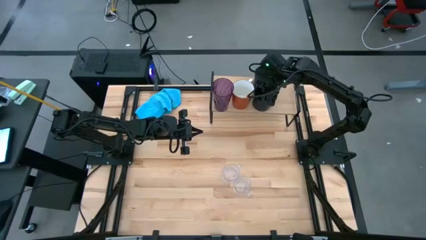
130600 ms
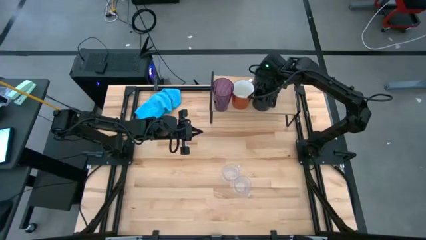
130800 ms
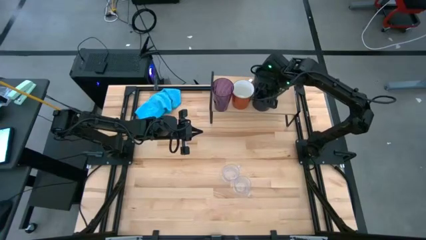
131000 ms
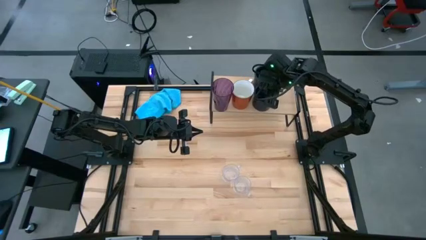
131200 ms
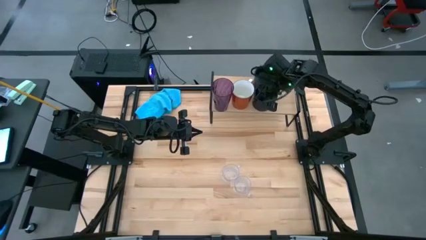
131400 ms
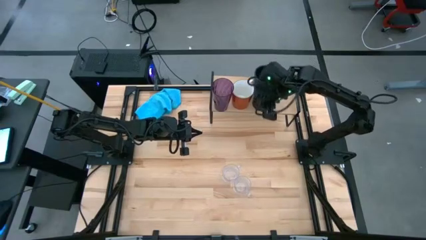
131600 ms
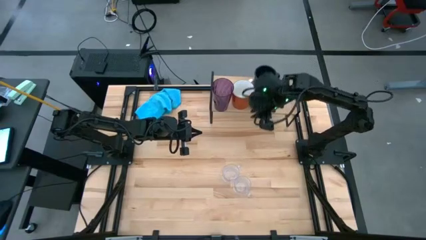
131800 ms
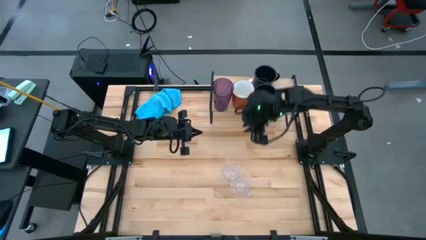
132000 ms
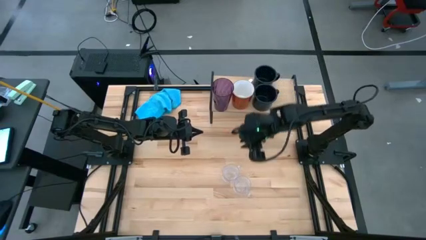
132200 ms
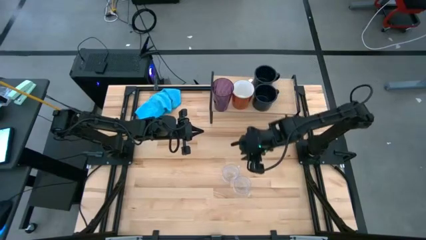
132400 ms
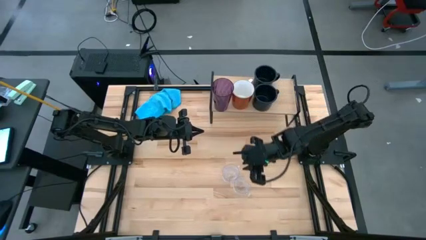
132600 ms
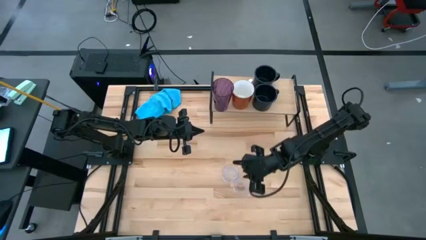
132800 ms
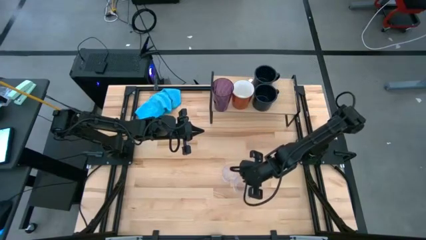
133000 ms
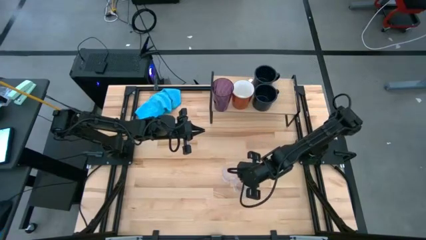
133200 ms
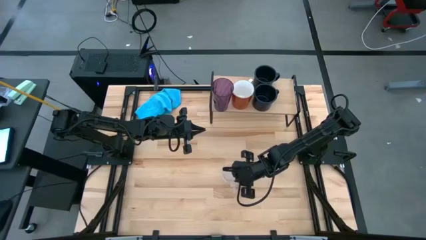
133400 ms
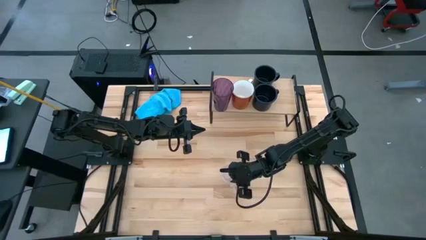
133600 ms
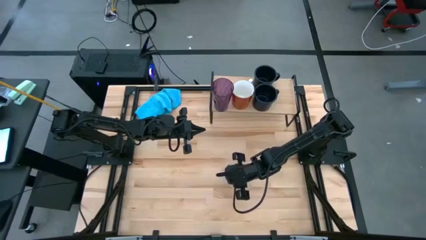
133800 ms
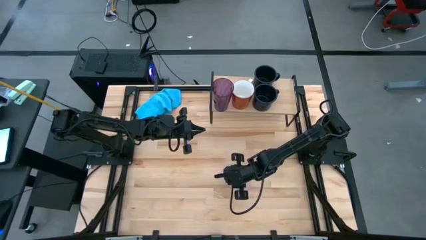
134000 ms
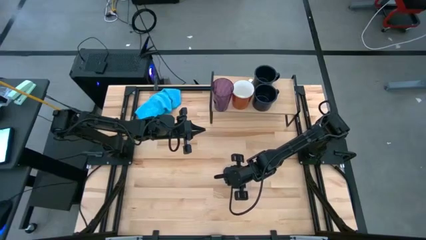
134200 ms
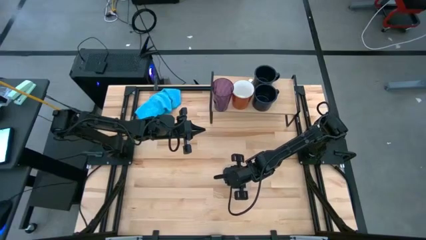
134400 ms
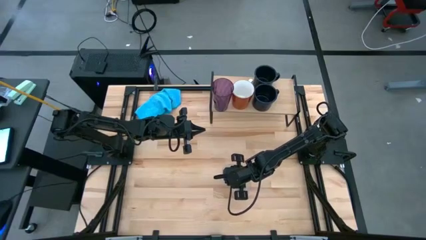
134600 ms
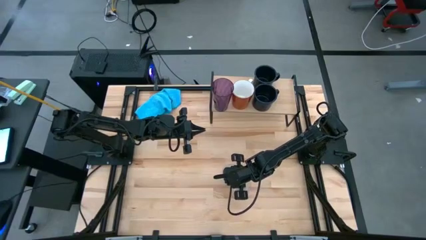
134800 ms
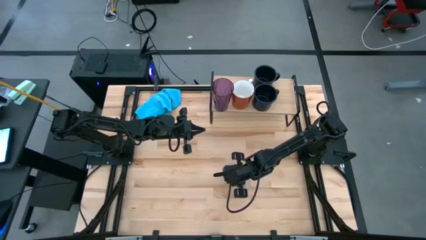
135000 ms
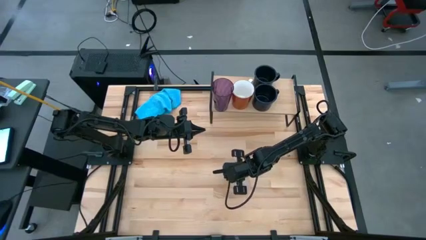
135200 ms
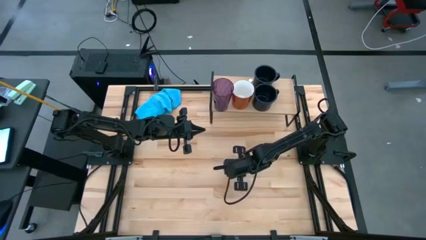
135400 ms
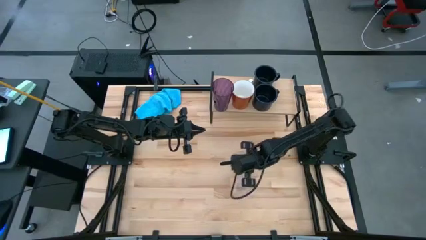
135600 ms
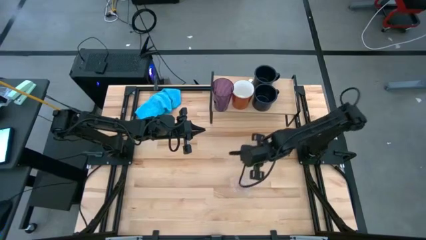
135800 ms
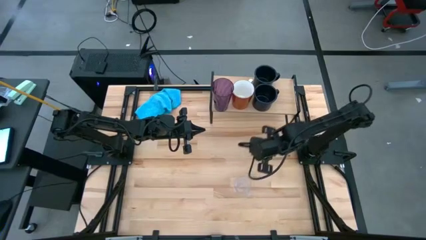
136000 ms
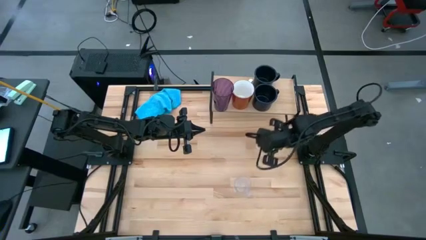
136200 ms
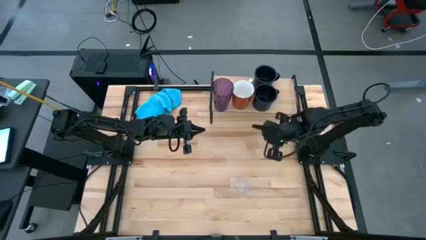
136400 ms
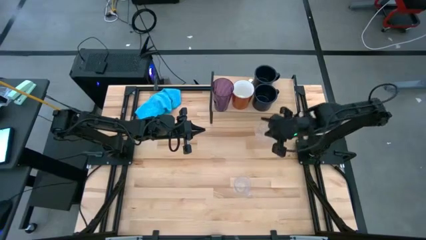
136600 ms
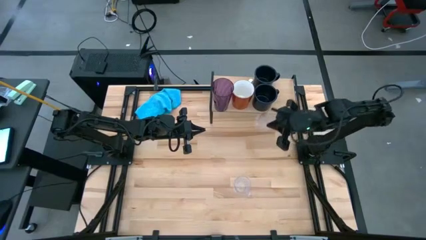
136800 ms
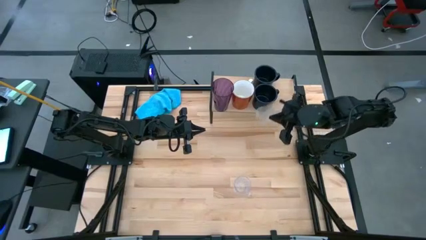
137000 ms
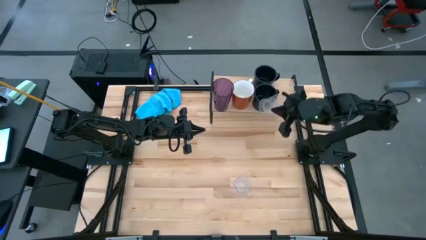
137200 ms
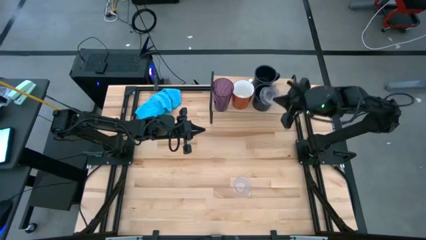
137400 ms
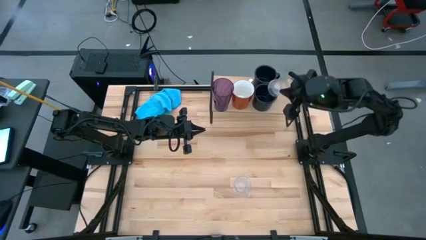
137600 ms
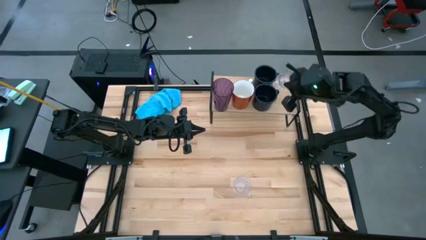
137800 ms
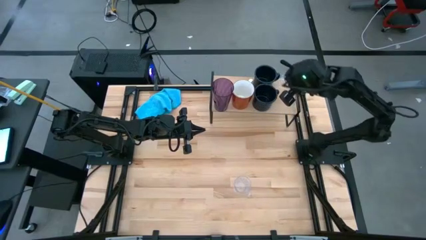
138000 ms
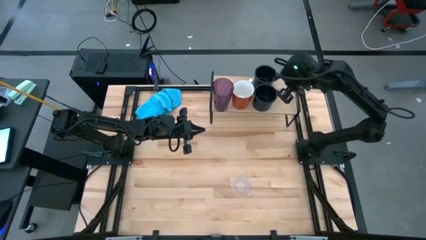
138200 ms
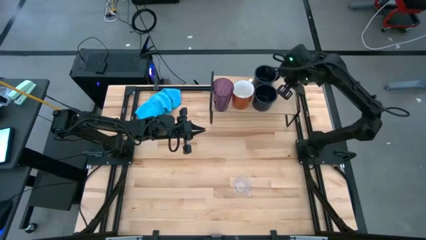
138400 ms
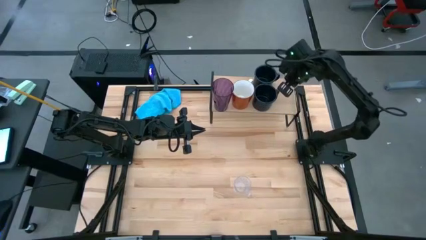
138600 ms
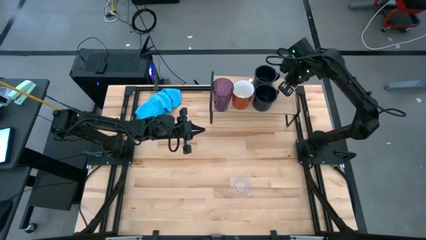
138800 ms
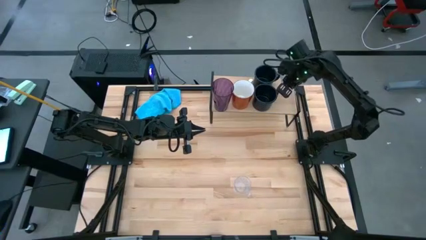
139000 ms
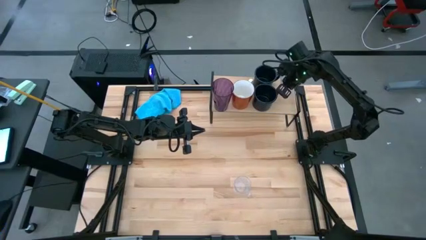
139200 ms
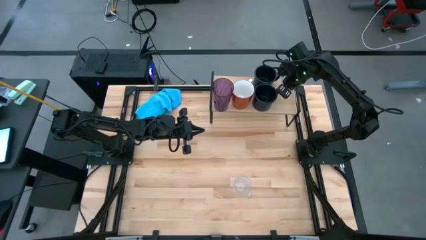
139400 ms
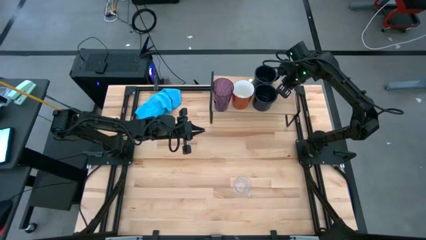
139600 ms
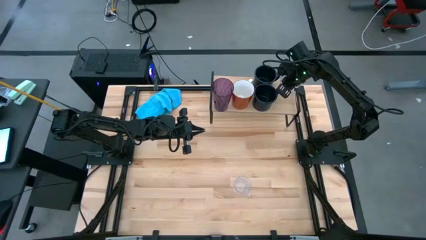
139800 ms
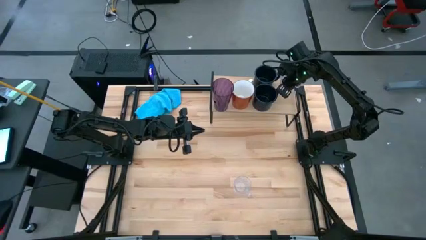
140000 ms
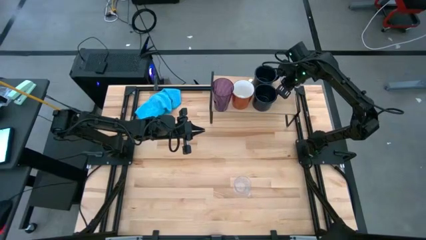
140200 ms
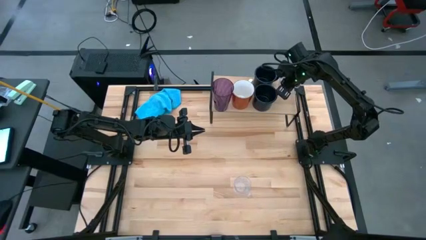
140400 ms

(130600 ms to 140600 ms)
Task: Stack small to large cups/mugs on shelf
Put the top transparent mug on the shelf

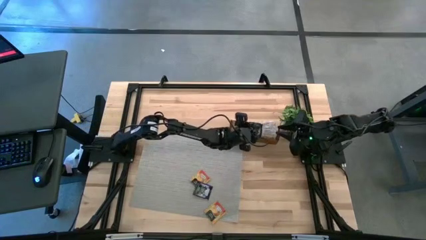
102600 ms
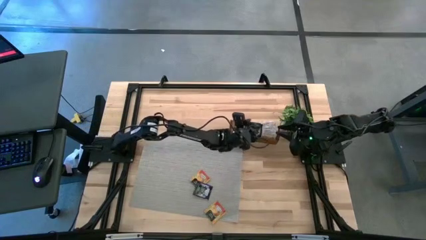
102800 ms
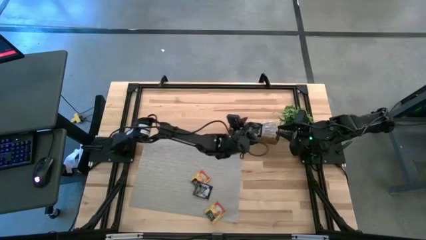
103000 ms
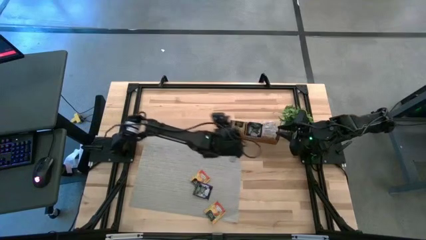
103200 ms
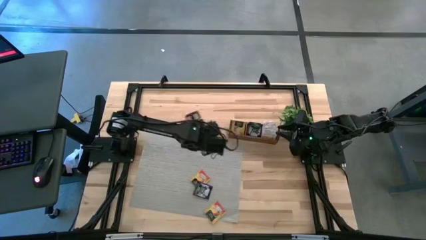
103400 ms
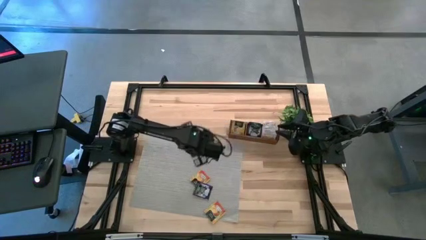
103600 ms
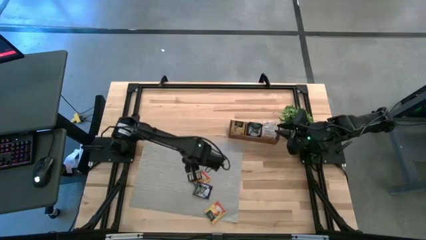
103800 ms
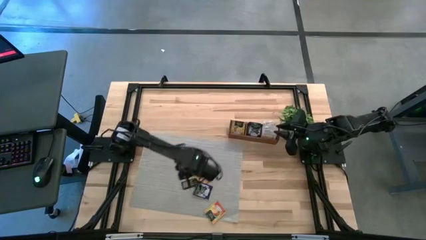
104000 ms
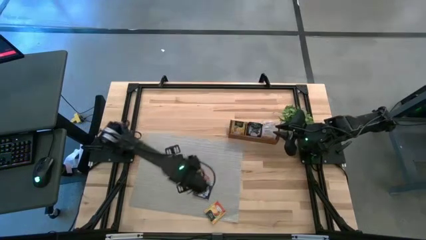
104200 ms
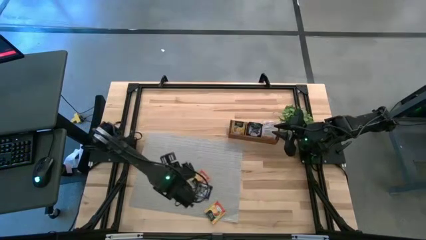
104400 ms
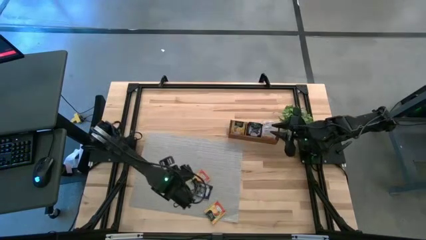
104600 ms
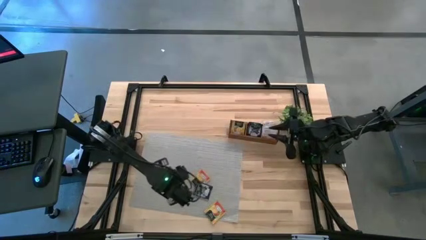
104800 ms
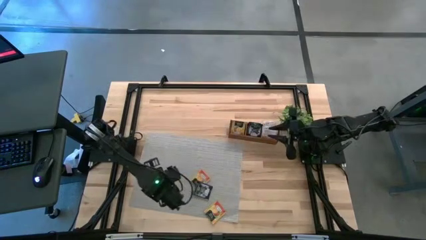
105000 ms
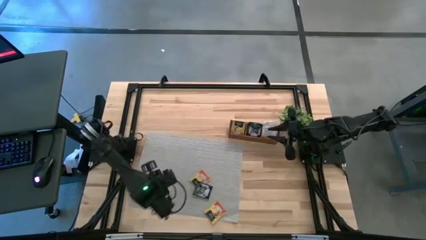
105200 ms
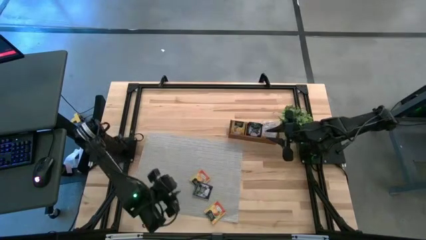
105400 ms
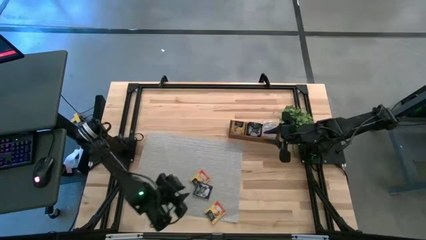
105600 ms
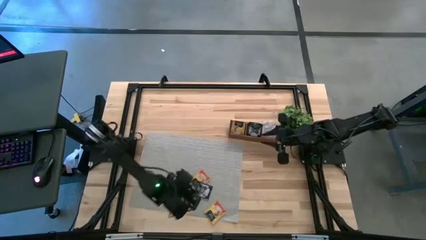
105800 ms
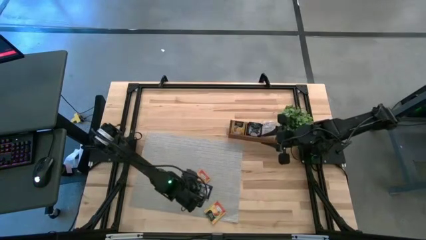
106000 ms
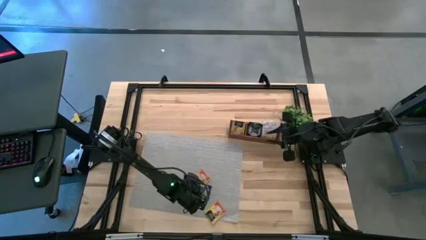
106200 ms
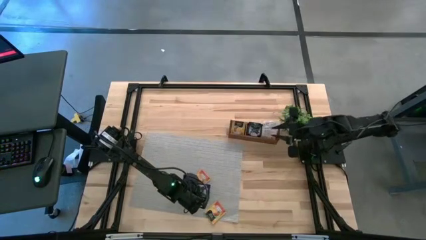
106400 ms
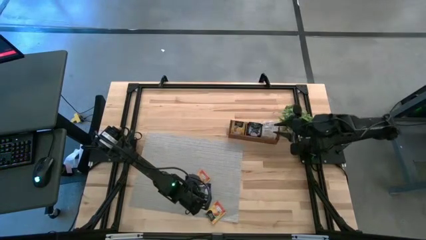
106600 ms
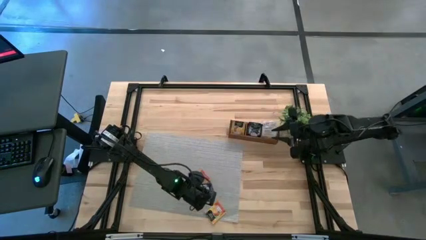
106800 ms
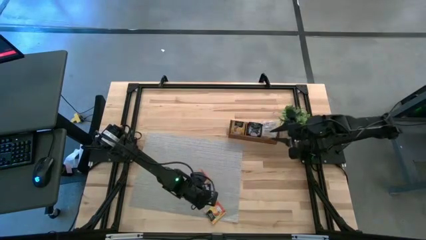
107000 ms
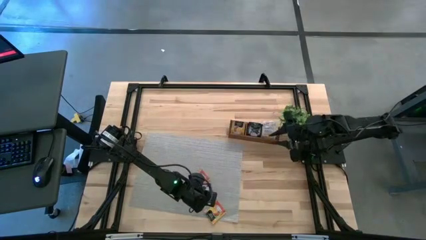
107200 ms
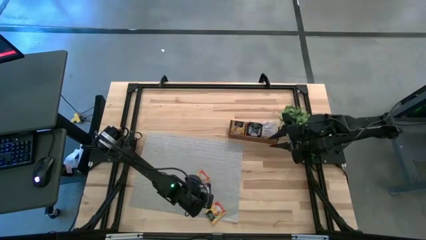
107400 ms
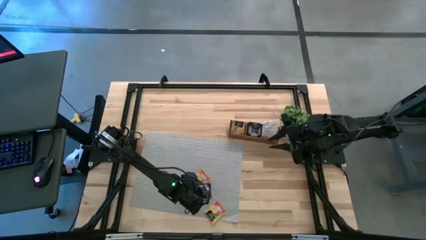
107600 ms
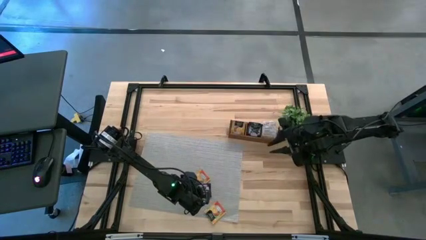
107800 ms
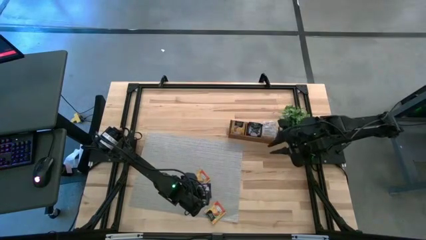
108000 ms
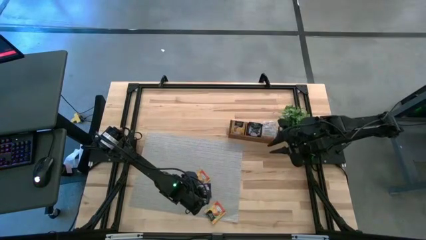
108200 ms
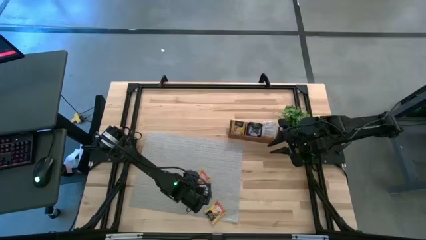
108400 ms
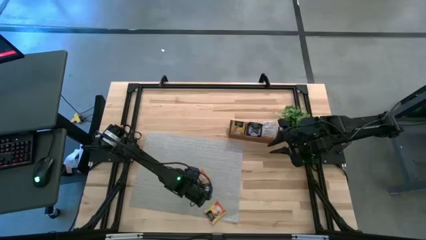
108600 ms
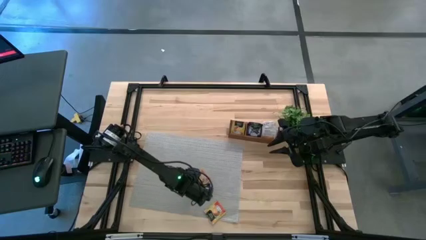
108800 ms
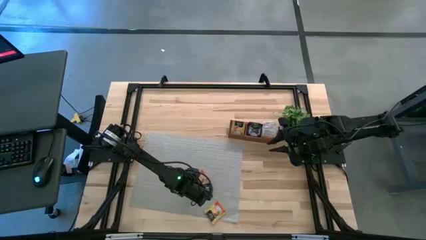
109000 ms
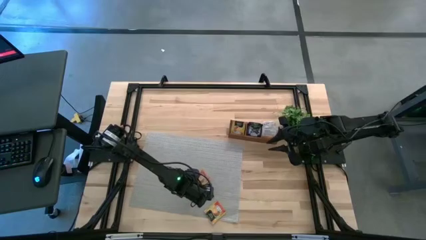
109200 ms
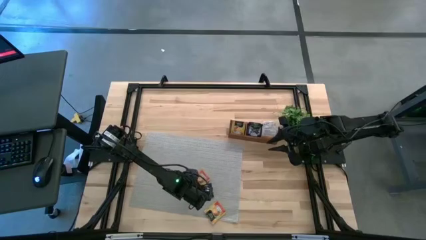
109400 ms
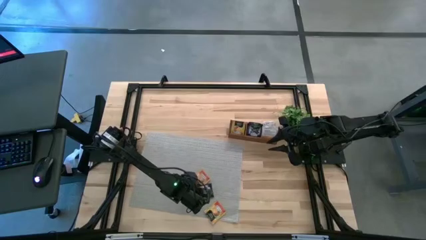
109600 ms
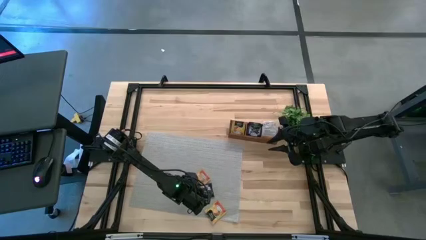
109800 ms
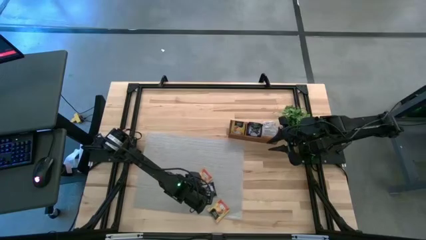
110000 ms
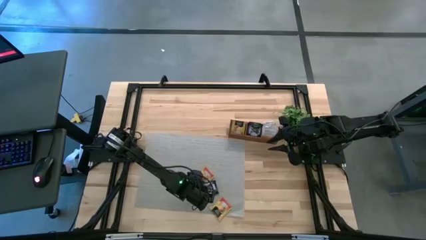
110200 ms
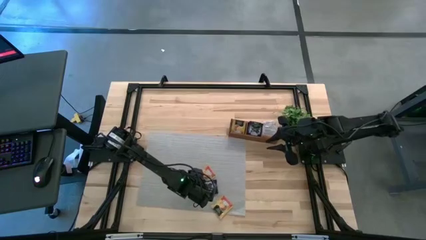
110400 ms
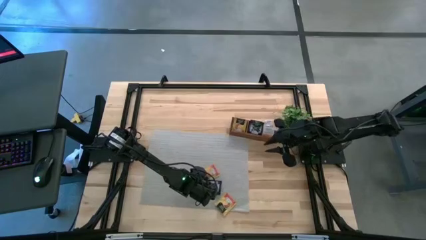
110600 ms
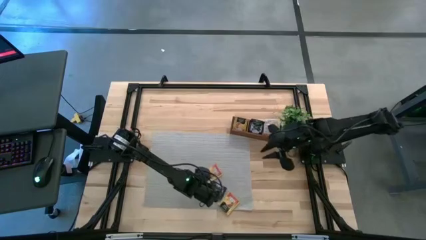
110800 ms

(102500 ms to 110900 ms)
Task: Pick & Place Tea
Put the dark purple tea bag in the middle section of the wooden organizer
